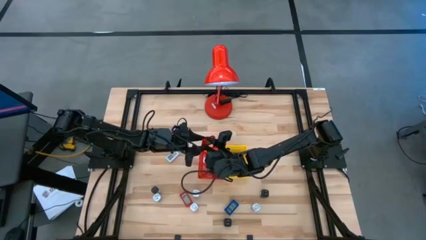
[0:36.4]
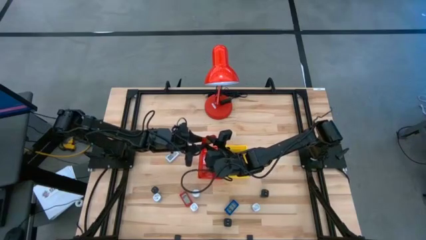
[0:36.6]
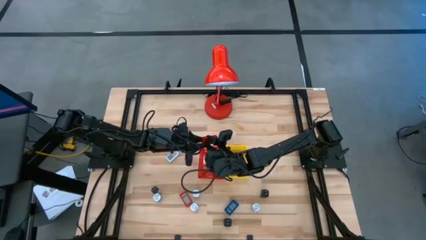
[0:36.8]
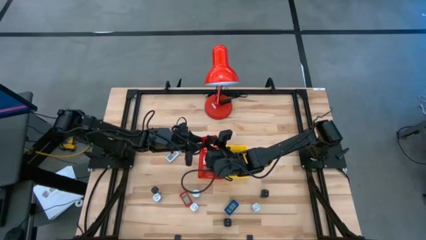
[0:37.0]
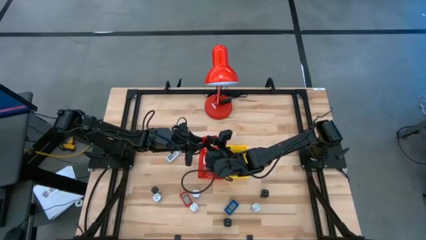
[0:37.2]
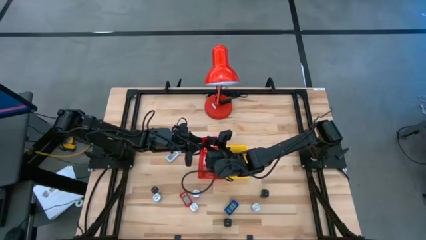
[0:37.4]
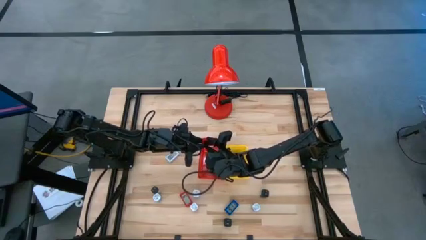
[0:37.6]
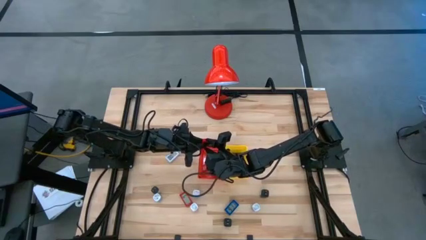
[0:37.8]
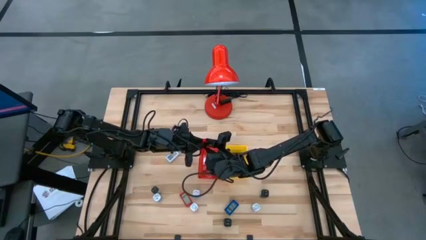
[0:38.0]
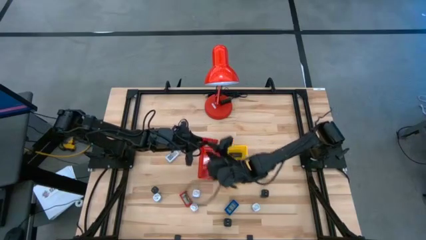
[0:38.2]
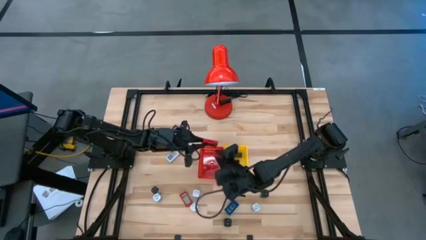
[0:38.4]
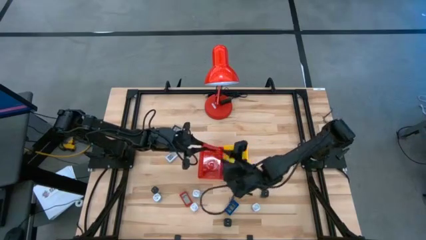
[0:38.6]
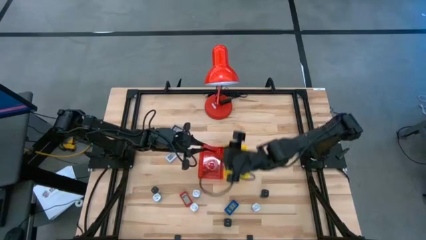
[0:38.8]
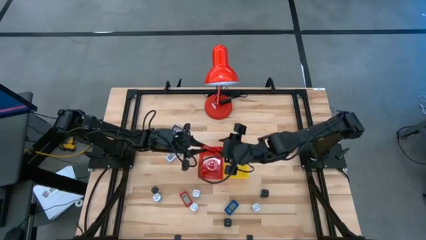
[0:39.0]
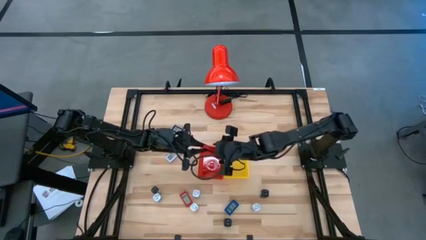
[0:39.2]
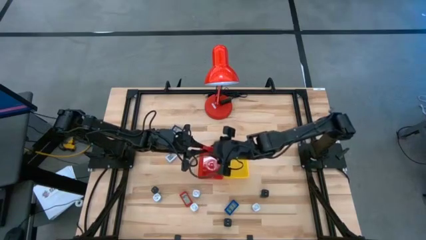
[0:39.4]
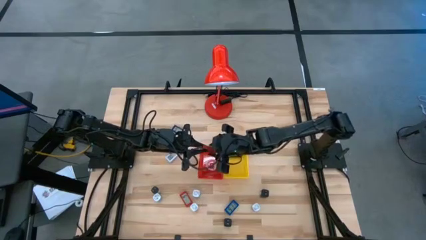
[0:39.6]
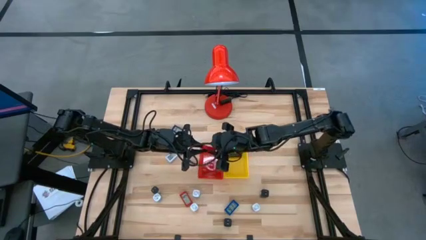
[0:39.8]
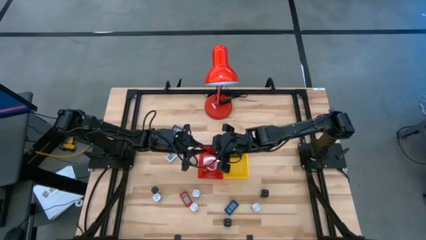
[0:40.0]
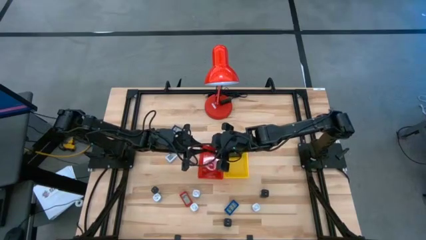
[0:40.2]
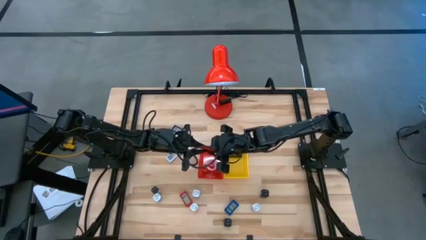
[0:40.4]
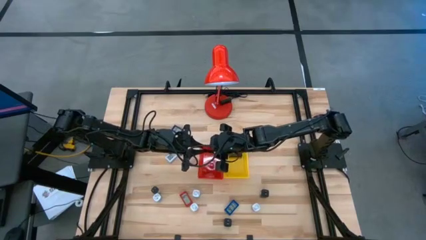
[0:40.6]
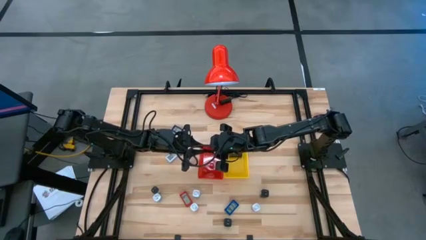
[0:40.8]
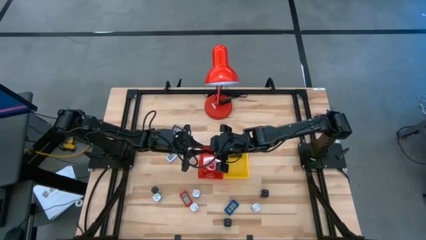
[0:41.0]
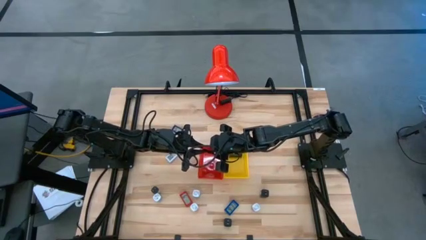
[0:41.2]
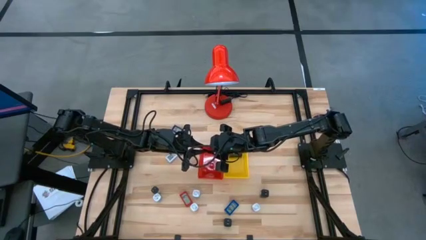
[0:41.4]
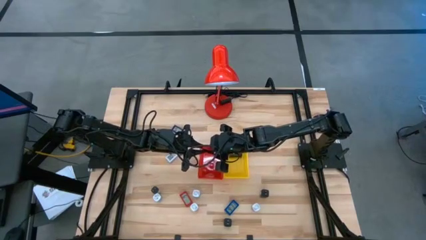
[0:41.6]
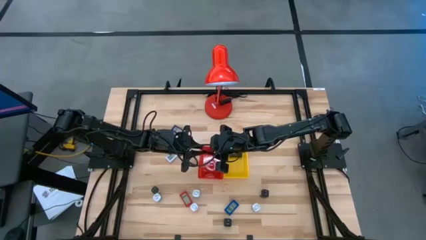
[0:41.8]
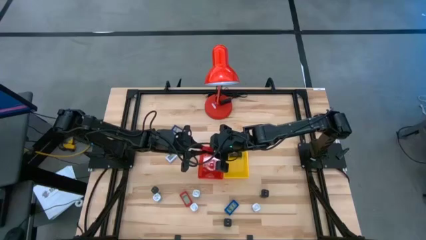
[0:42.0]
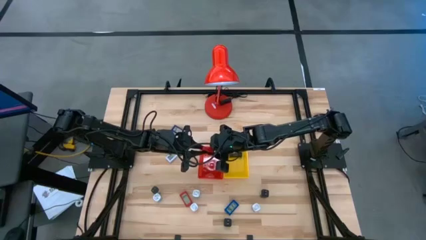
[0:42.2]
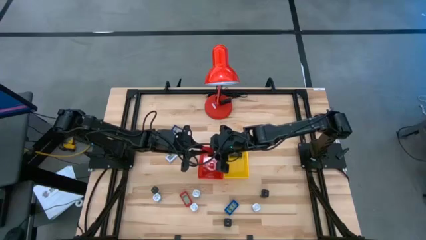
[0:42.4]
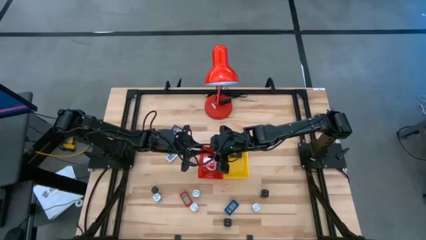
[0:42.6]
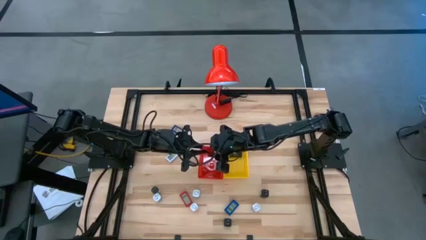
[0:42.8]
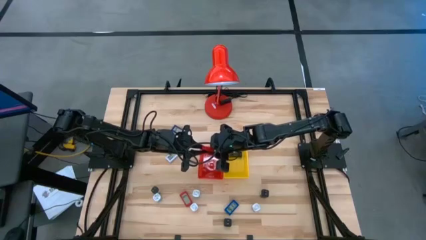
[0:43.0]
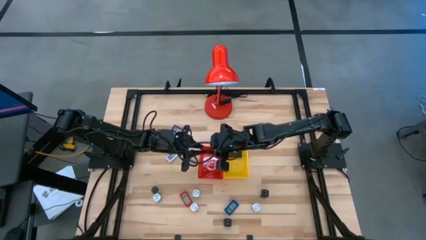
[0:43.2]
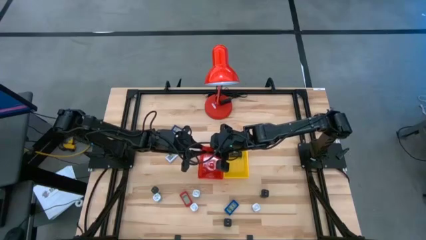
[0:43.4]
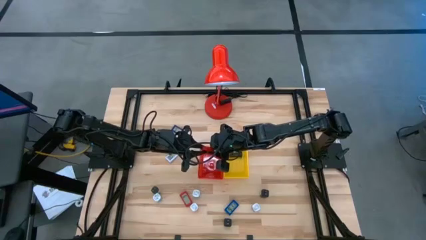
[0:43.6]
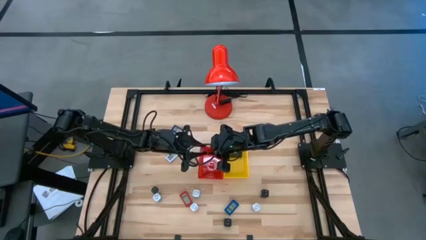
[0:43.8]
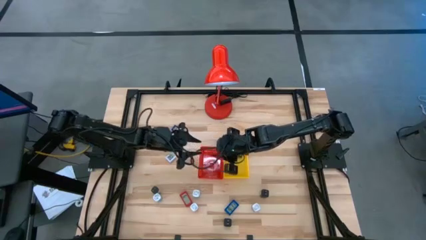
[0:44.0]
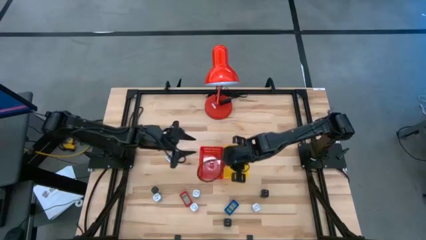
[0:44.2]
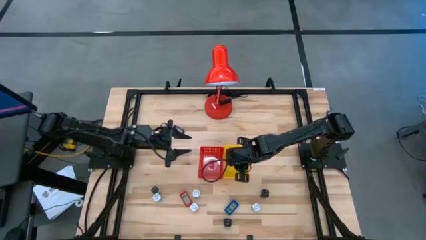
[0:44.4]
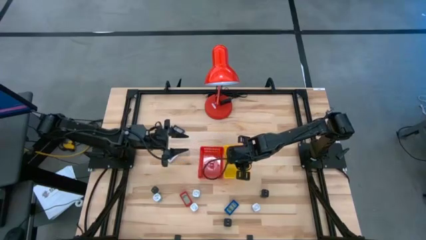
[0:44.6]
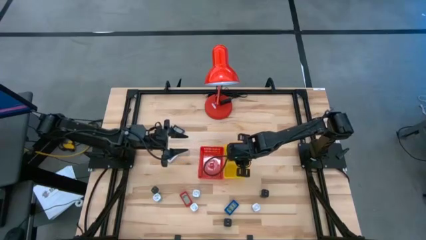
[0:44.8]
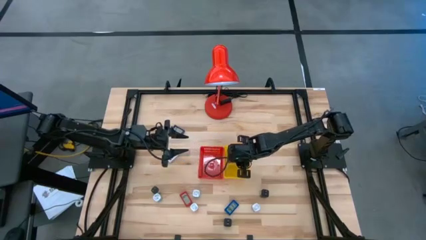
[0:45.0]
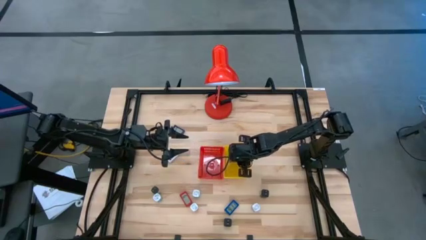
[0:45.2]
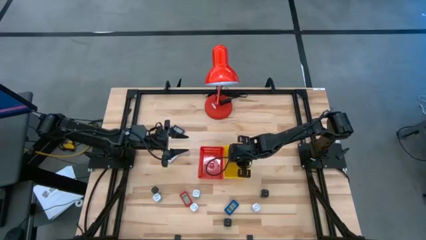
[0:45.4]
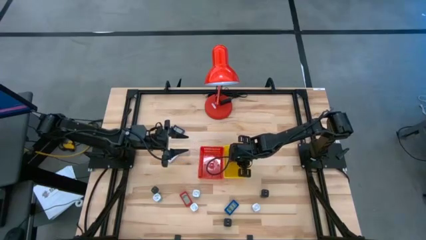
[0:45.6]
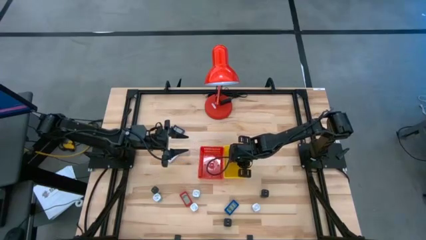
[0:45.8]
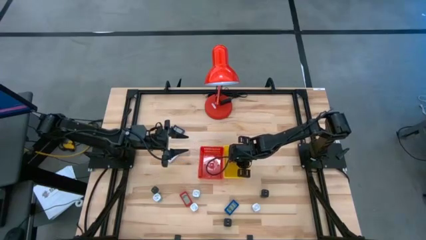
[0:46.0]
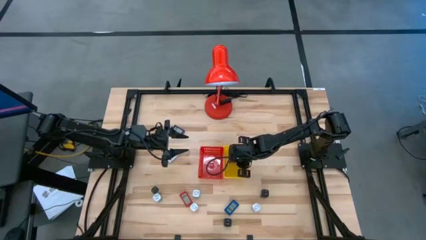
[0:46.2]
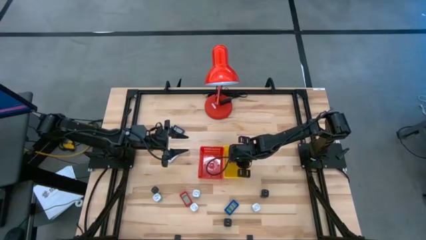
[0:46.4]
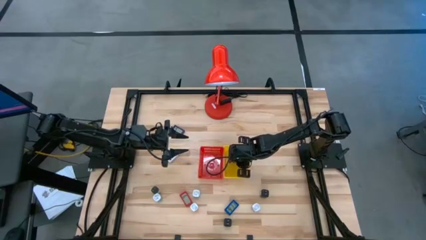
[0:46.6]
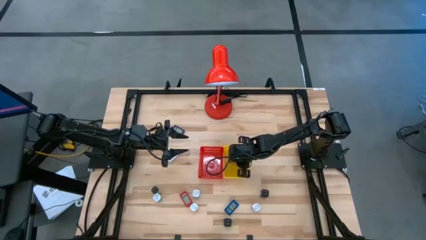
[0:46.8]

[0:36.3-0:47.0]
Task: Pick & Place Office items
Put the red digital timer into the yellow bin

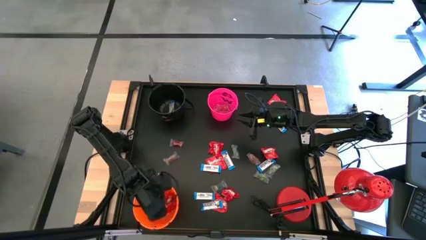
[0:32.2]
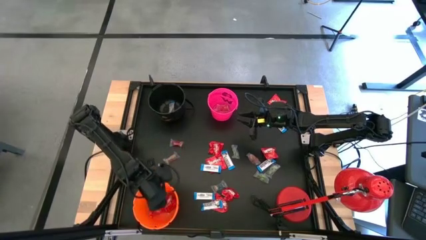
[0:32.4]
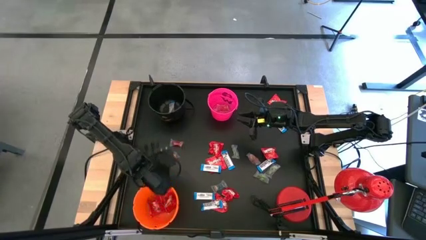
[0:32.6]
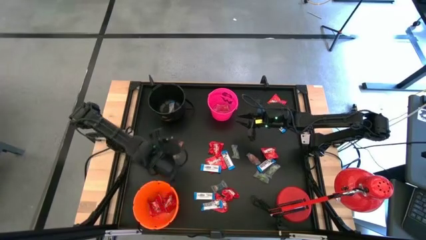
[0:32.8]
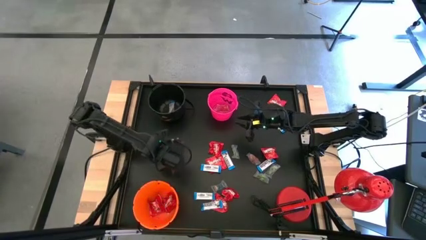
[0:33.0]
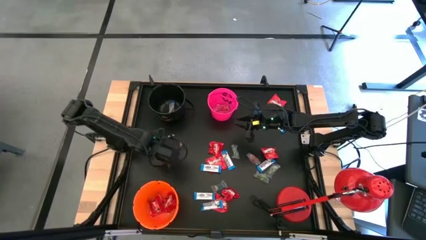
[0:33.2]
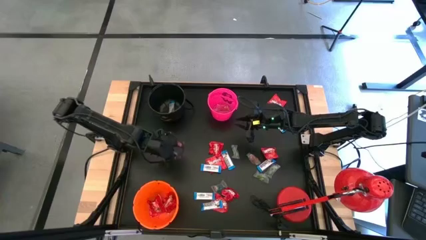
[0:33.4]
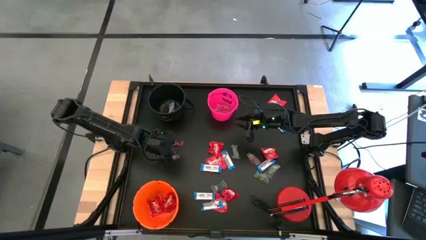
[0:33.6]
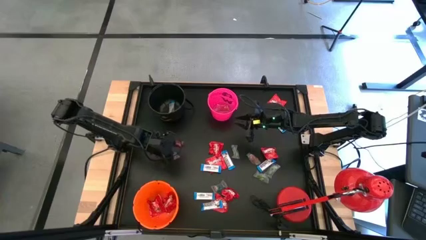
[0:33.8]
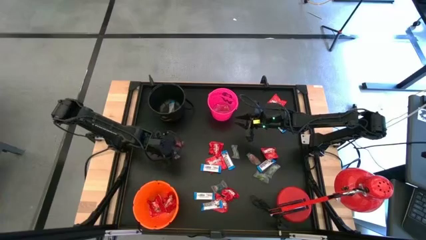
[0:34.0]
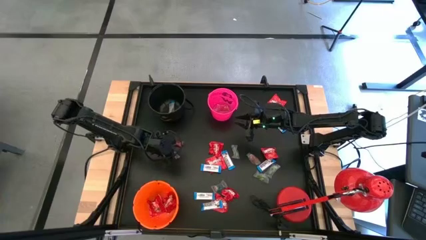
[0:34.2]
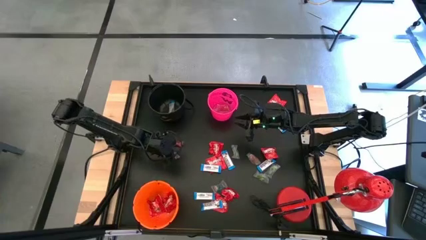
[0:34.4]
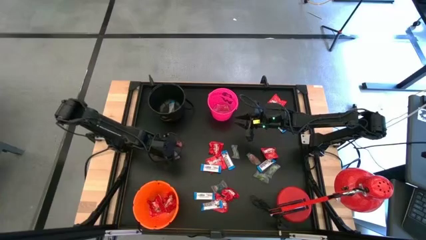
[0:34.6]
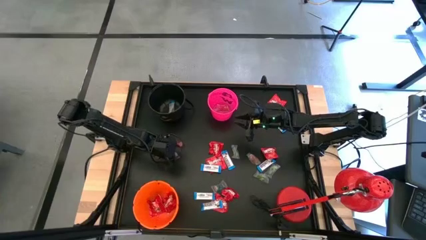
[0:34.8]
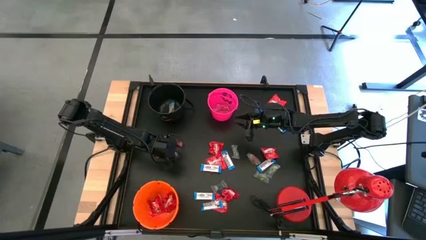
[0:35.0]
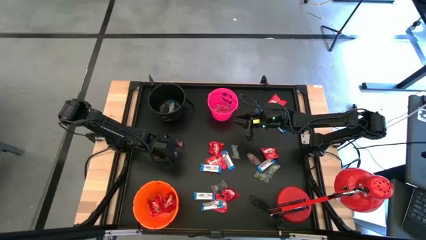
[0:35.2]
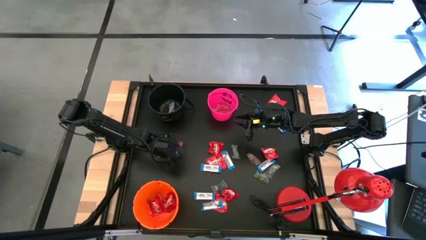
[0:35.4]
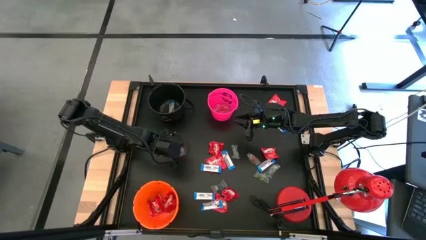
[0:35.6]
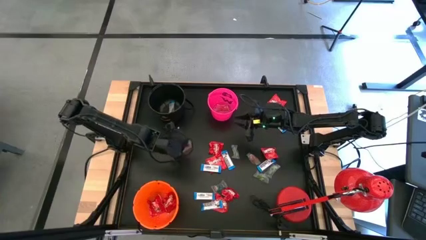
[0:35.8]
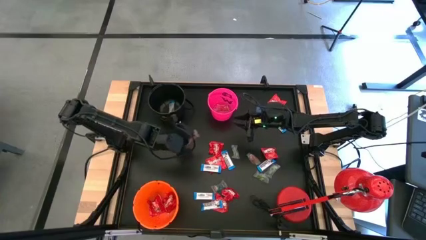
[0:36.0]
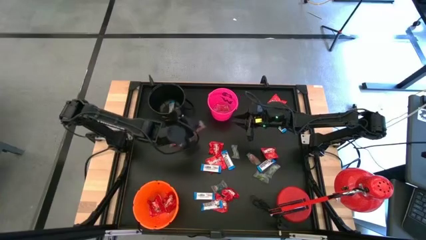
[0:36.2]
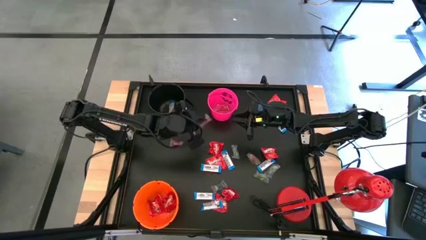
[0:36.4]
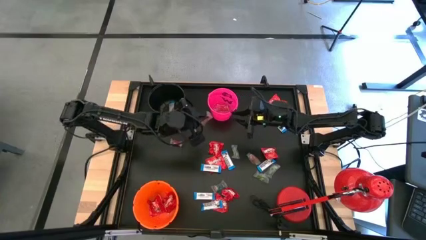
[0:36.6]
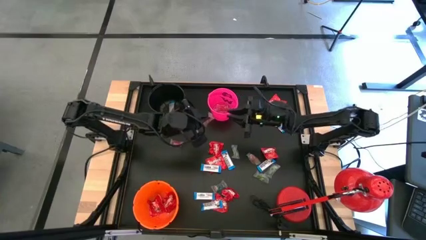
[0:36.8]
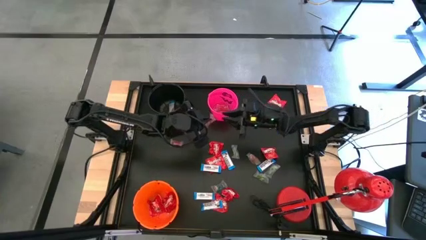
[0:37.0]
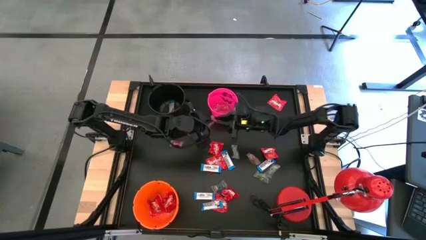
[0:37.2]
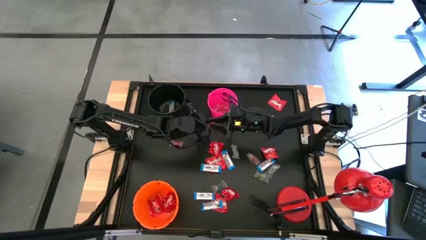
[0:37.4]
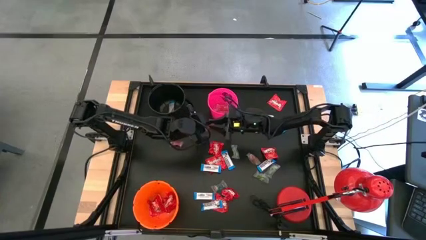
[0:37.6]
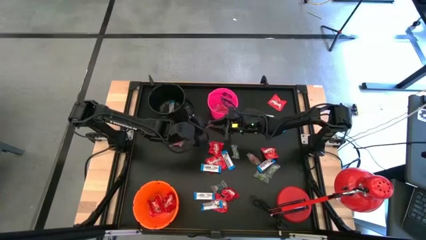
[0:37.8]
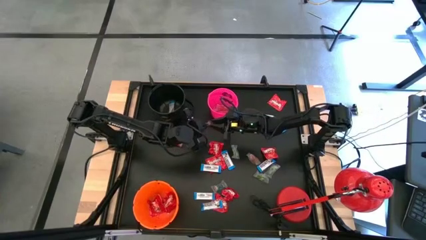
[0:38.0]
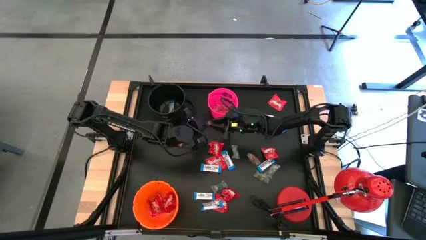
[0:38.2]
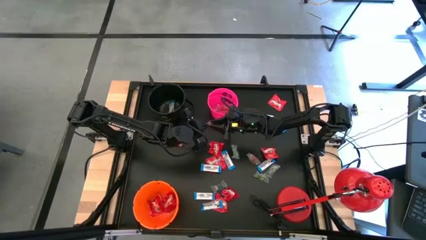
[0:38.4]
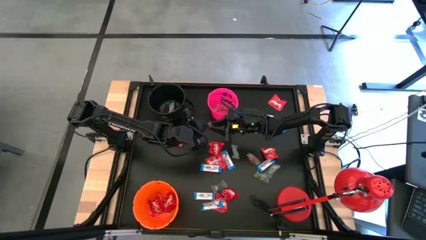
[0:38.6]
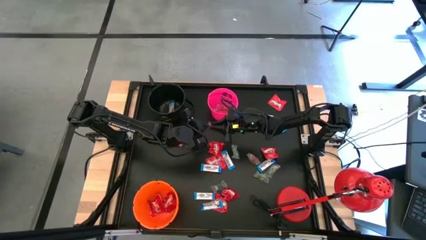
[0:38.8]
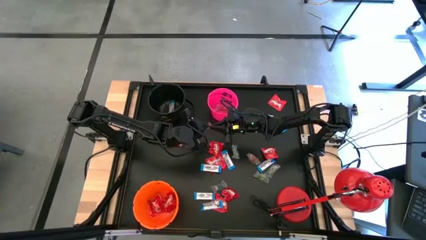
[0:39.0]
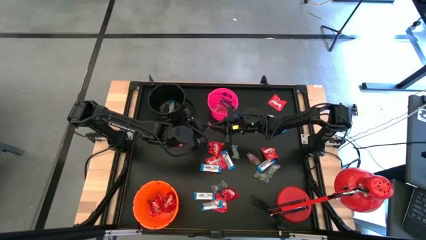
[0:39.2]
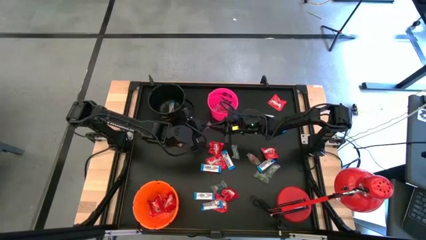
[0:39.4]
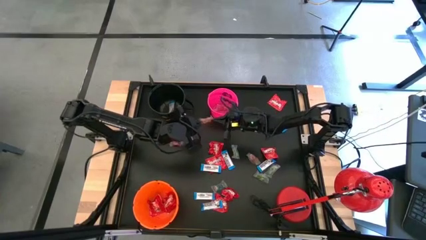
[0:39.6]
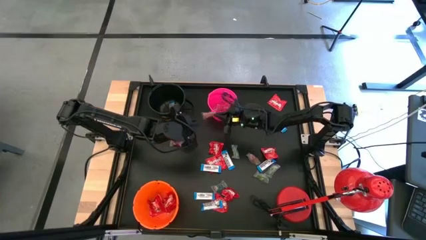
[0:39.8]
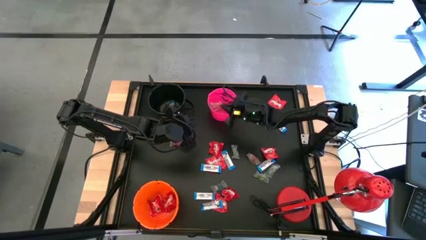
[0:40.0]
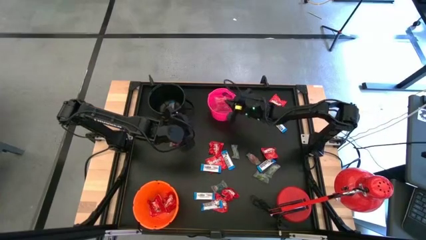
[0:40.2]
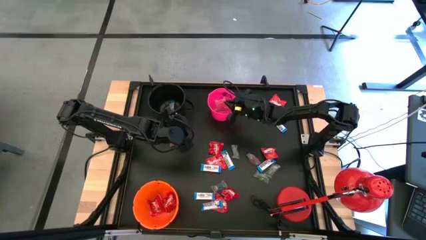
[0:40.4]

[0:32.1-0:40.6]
Task: Organize candy in baskets
Put the orange gummy into the pink bucket
